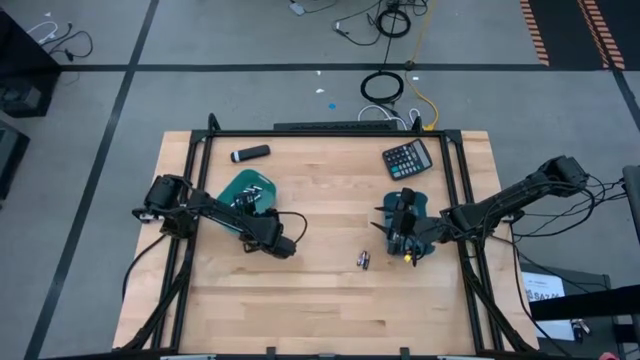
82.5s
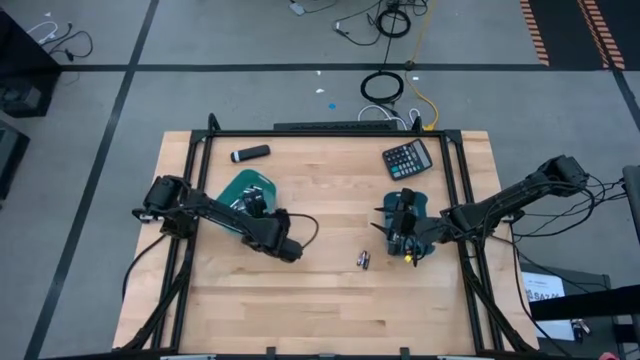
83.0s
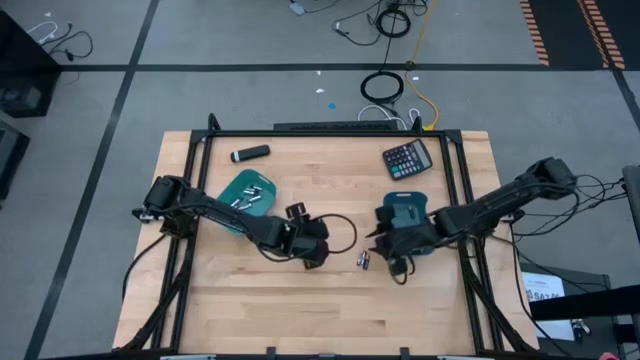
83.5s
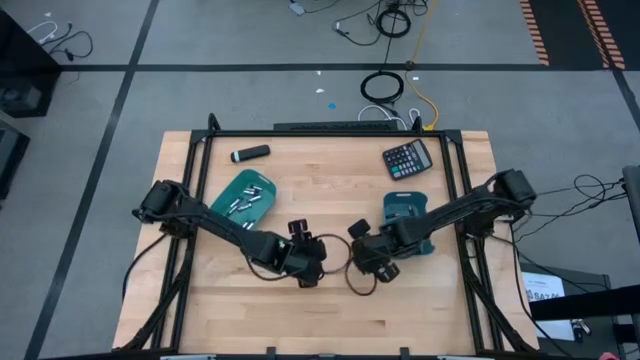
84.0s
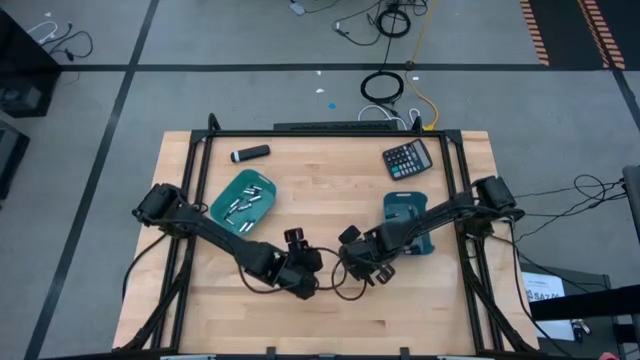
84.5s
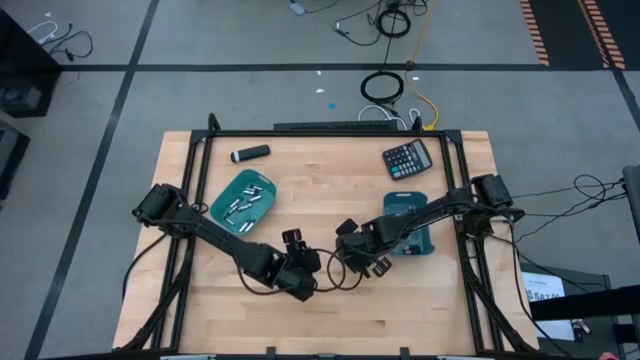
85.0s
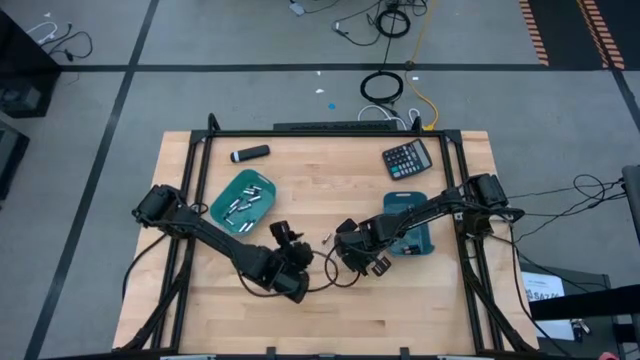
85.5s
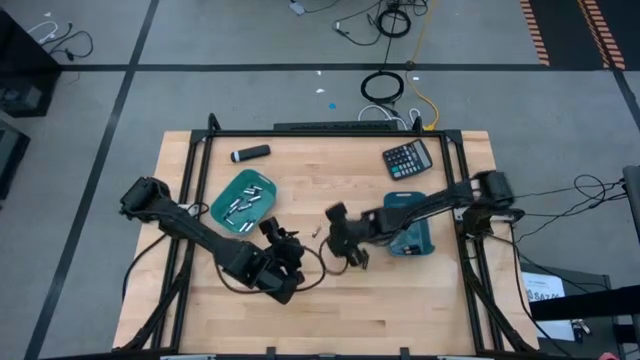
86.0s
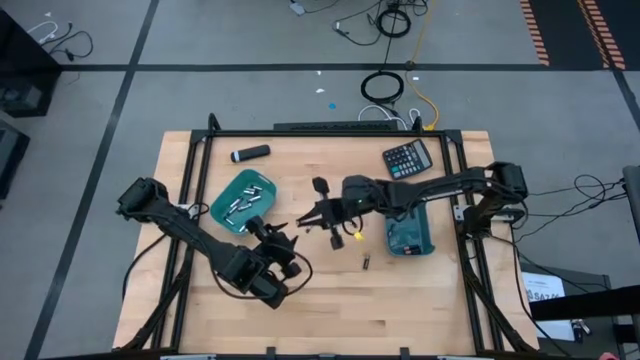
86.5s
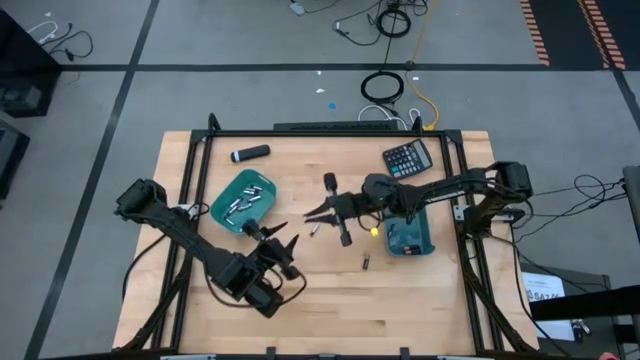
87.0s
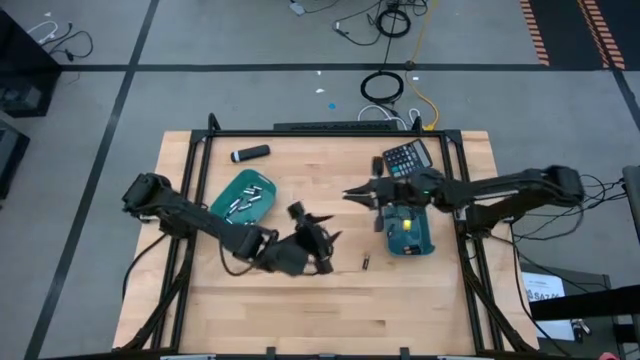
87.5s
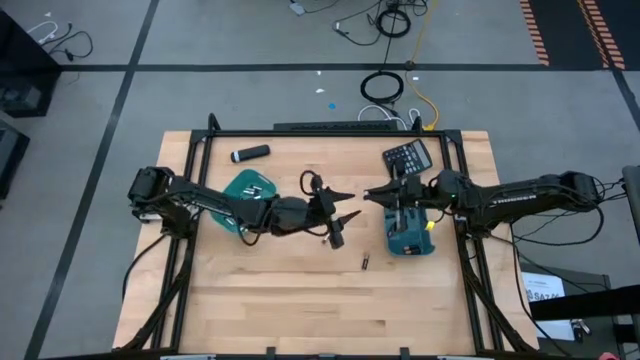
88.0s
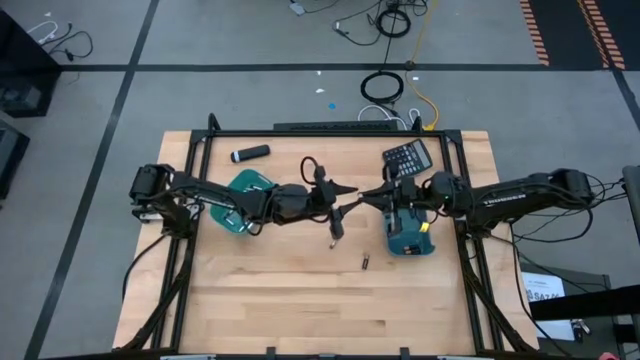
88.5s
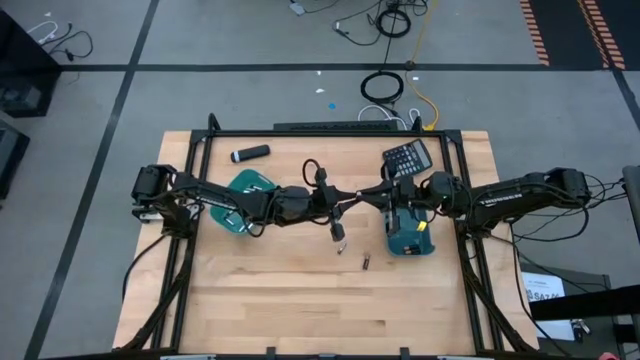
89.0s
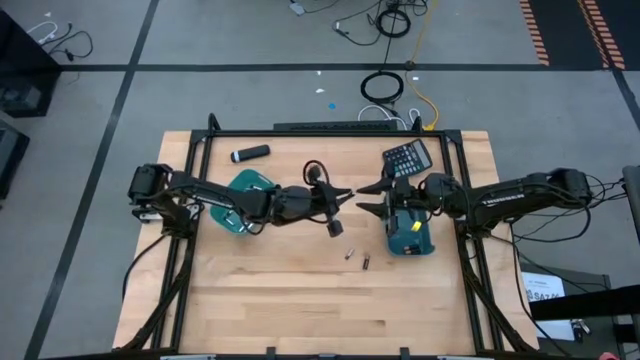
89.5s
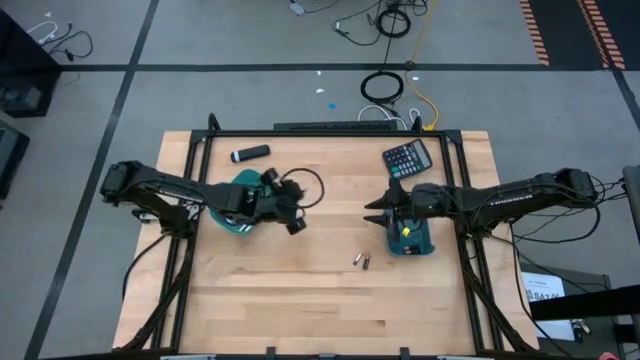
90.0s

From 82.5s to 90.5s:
Task: Sort batteries
Put the silver battery into the green bin

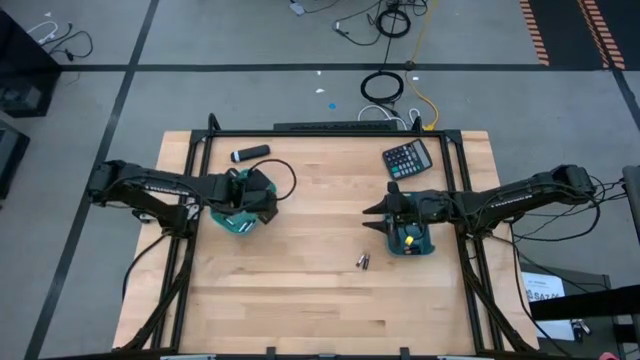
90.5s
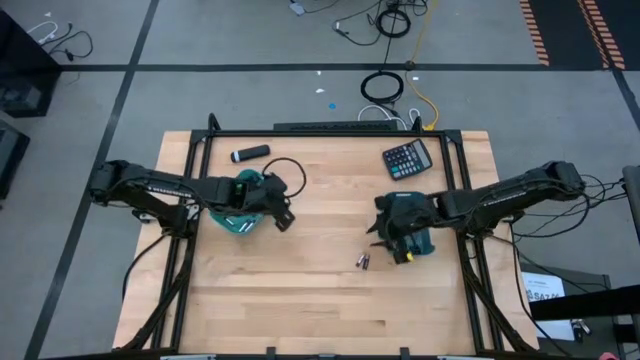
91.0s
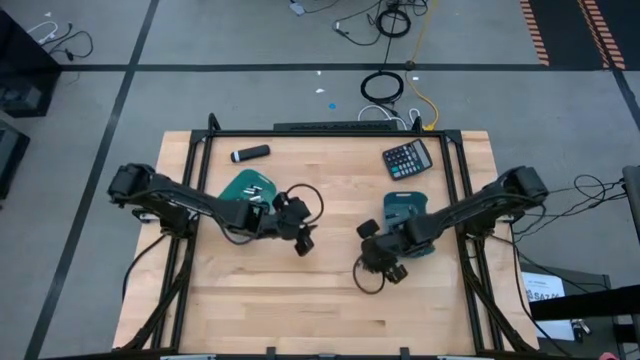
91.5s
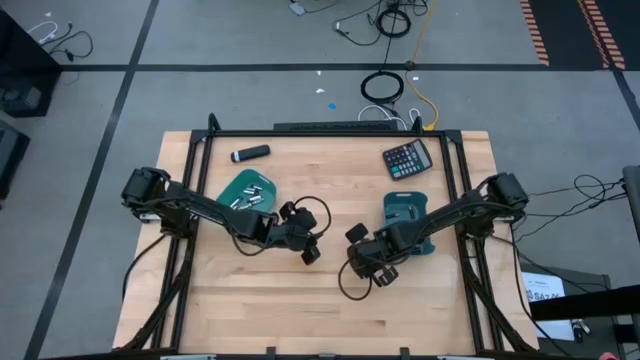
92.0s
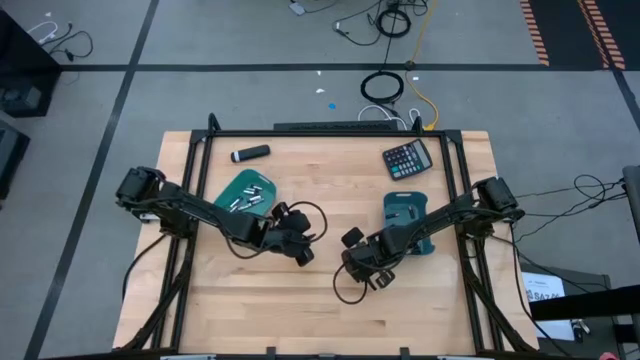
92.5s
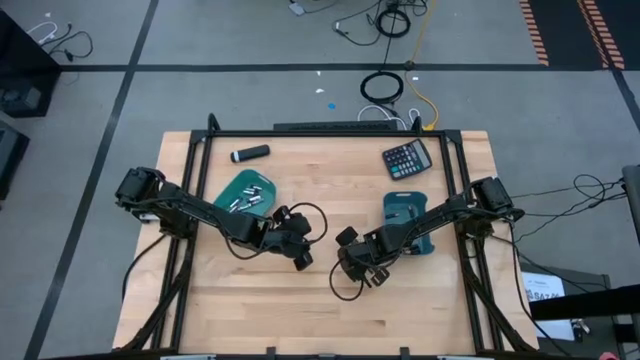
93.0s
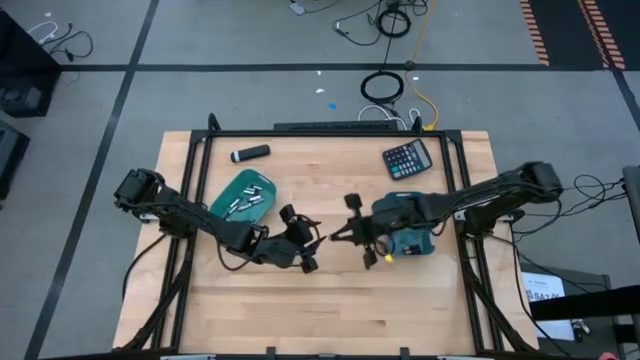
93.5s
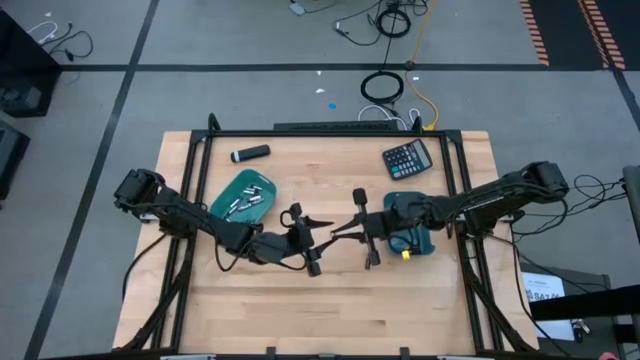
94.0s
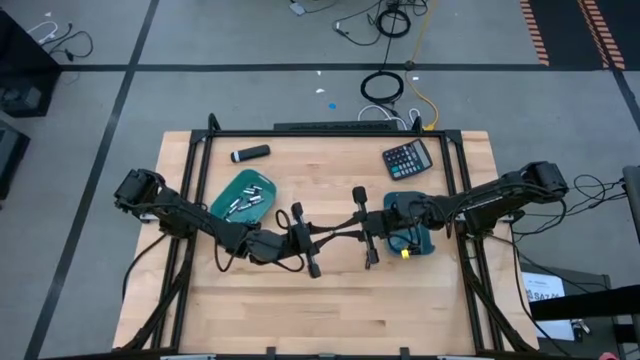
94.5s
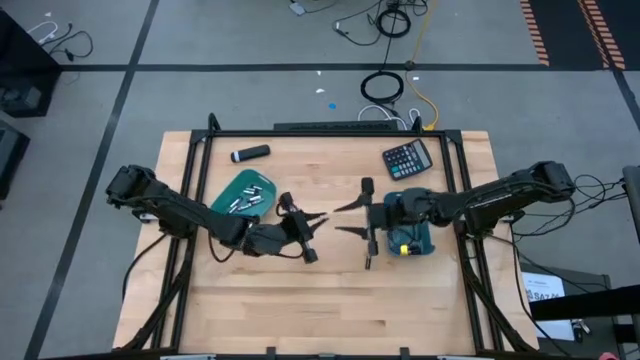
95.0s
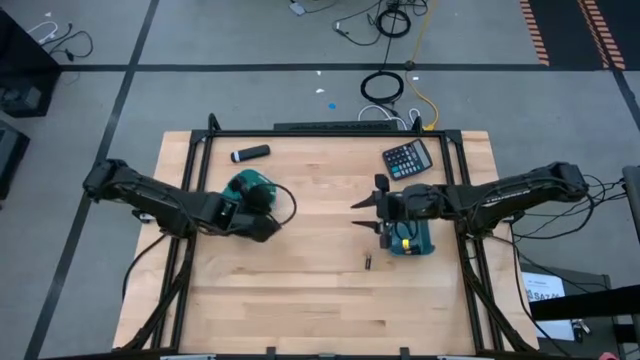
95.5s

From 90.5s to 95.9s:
Put the silver battery into the green bin

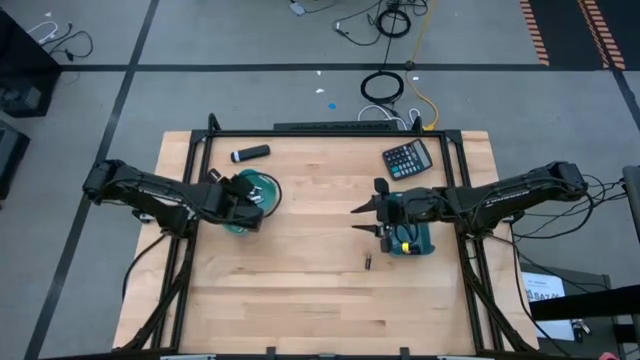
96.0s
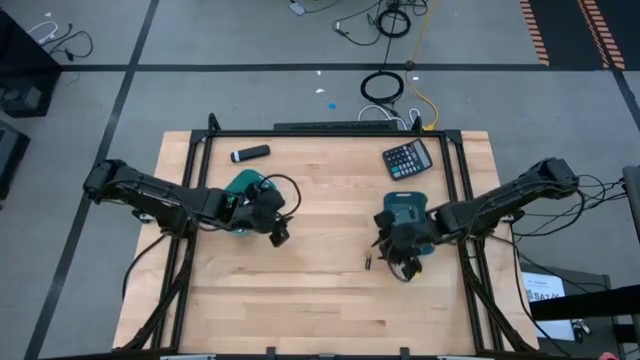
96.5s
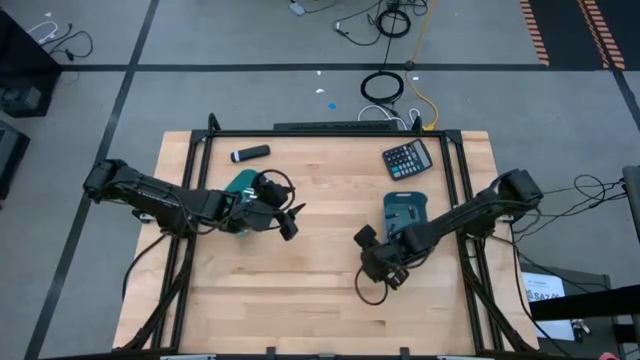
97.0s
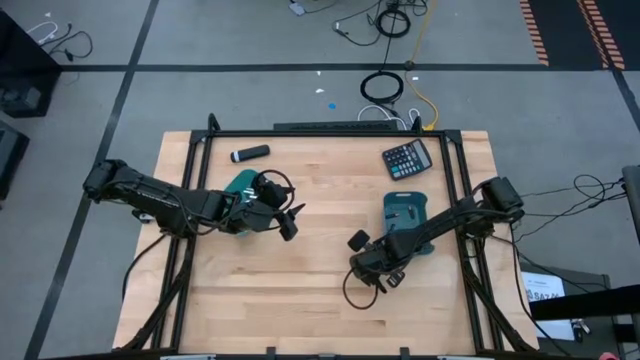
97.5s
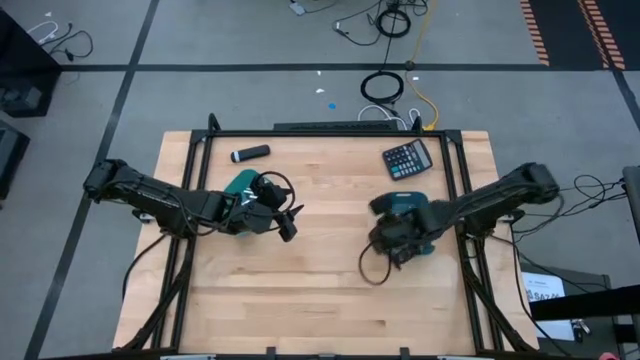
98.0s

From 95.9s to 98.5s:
Put the black battery into the blue bin

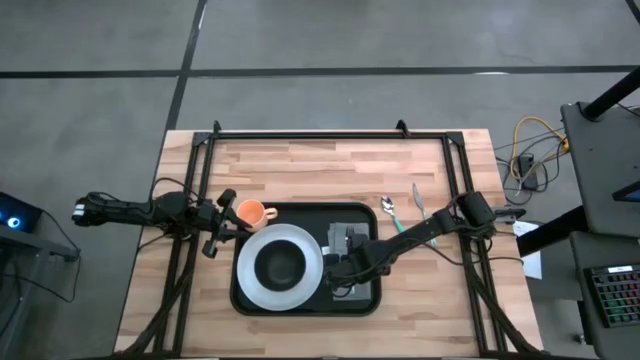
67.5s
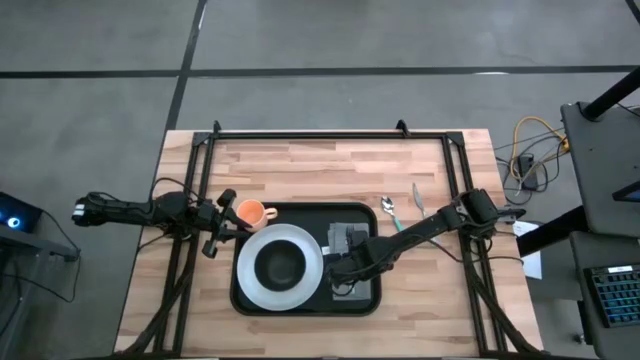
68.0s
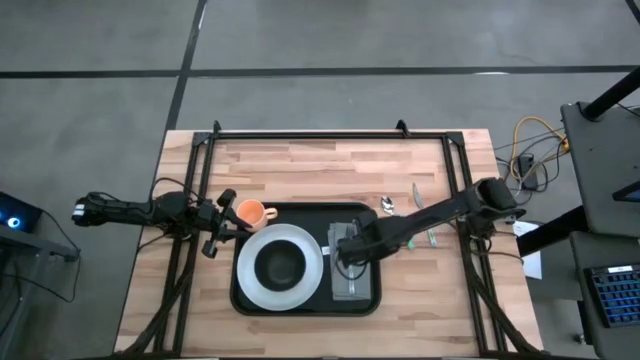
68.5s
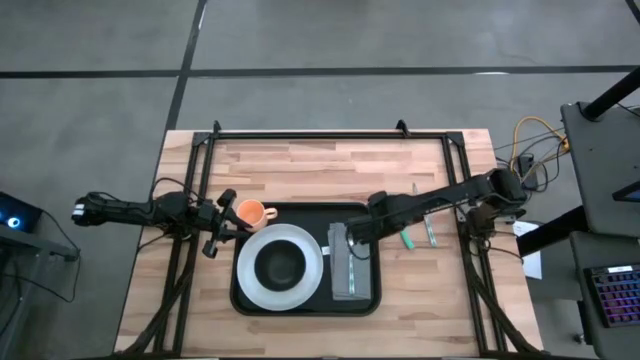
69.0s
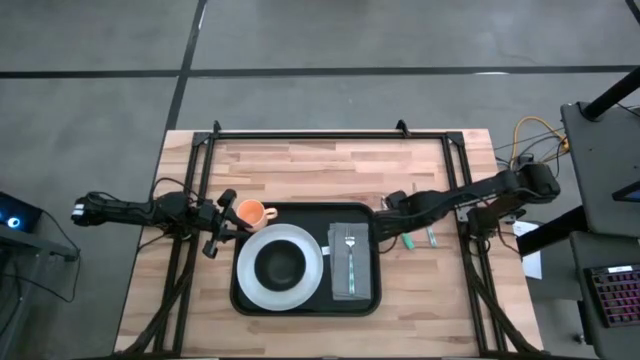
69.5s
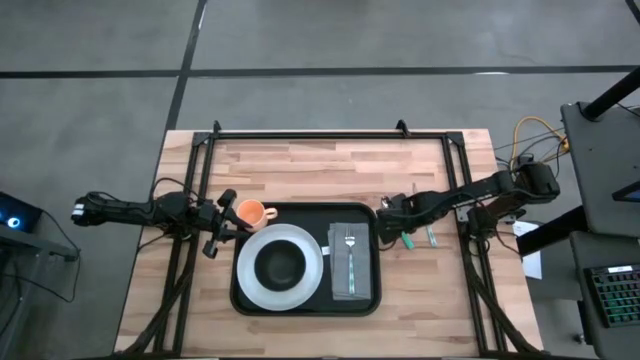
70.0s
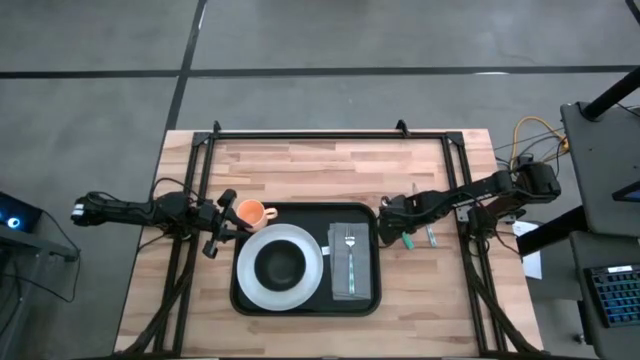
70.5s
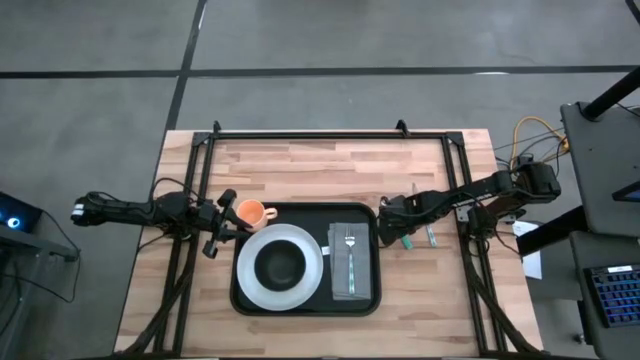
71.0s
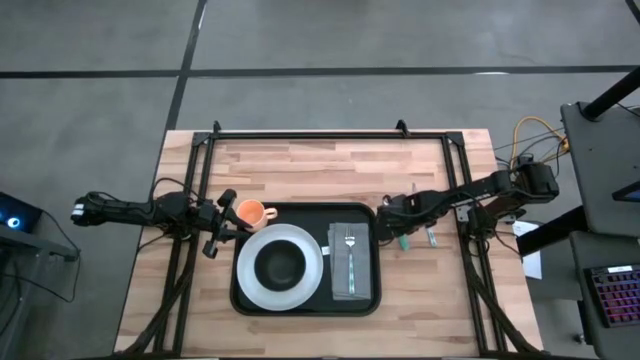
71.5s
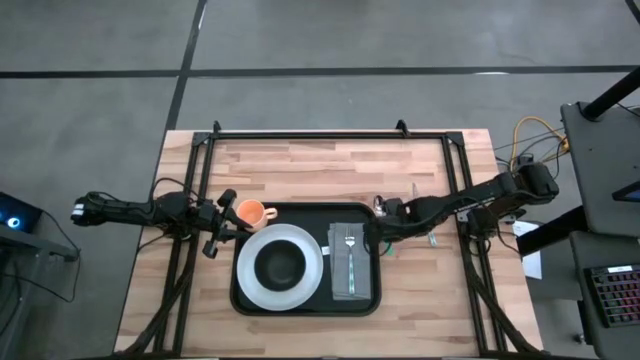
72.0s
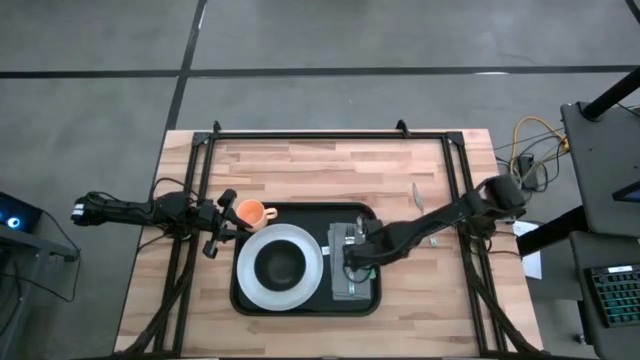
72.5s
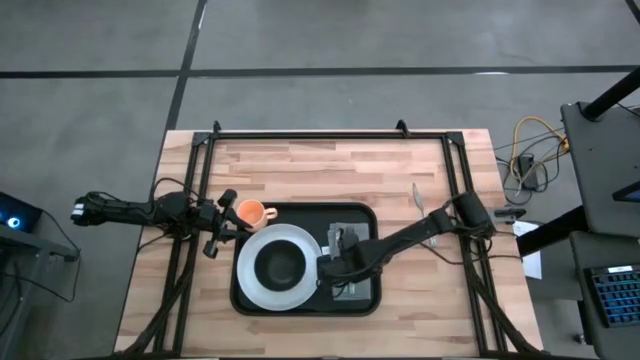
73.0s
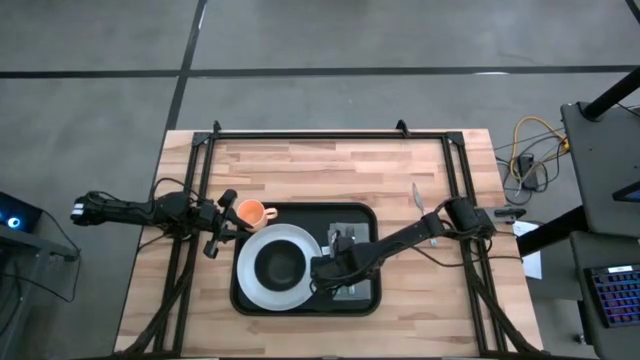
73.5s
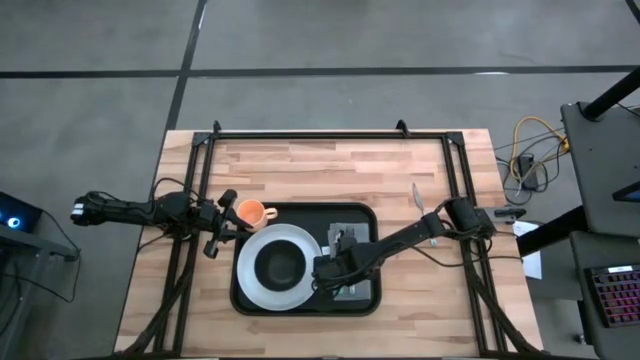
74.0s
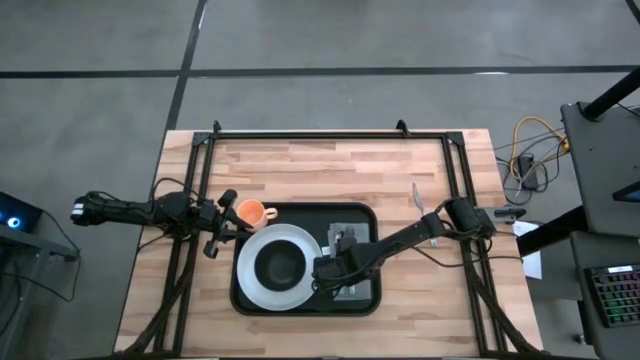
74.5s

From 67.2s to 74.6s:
Task: Set up tray
Put the blue spoon to the left of the blue fork on top of the gray table napkin on the black tray
